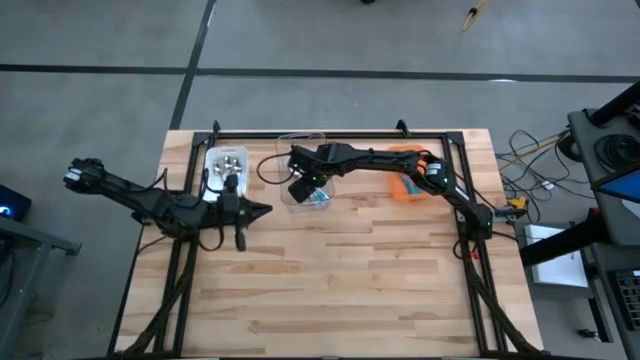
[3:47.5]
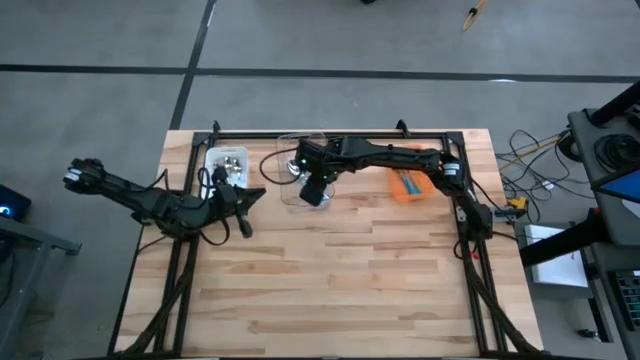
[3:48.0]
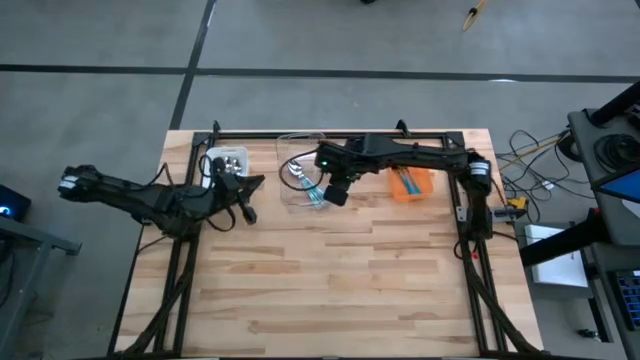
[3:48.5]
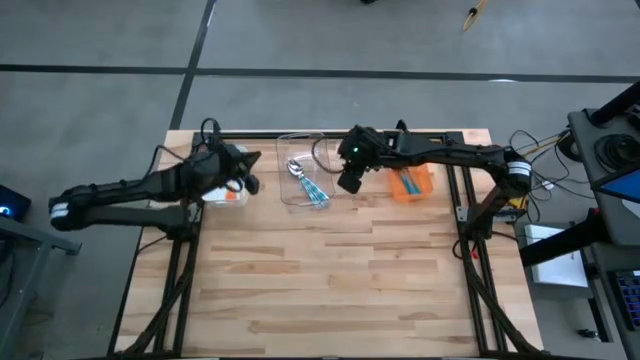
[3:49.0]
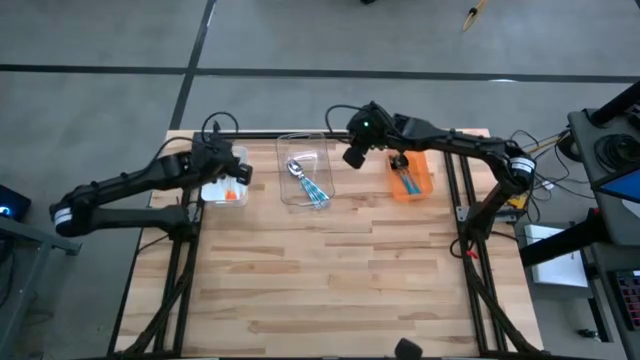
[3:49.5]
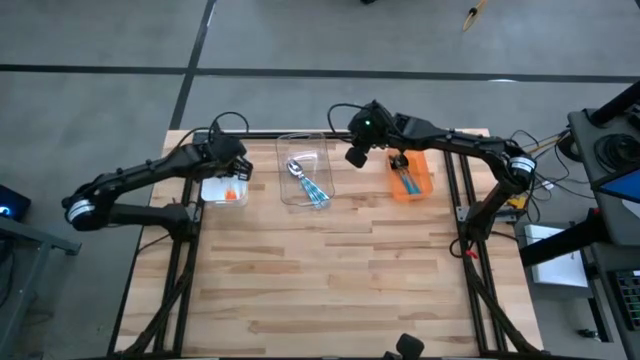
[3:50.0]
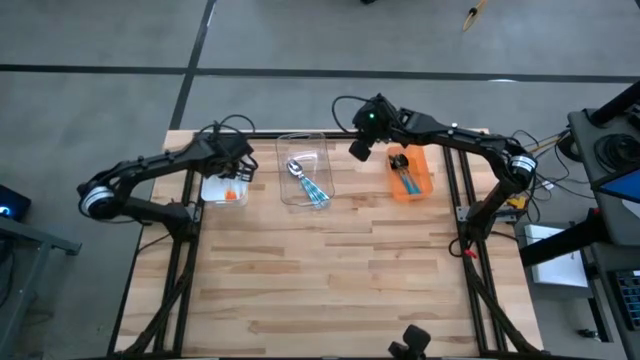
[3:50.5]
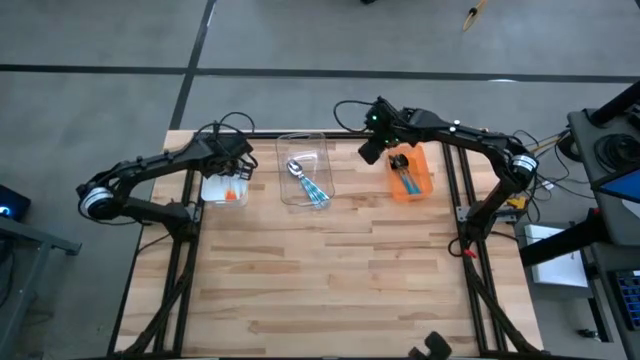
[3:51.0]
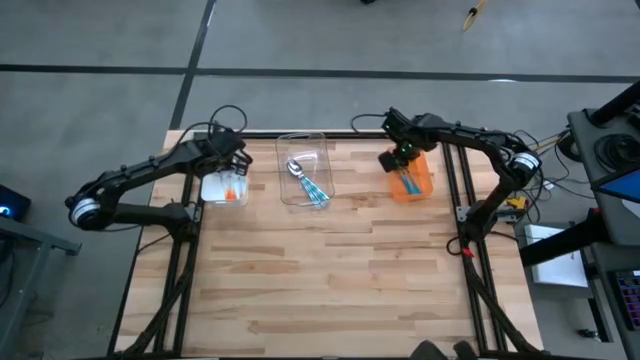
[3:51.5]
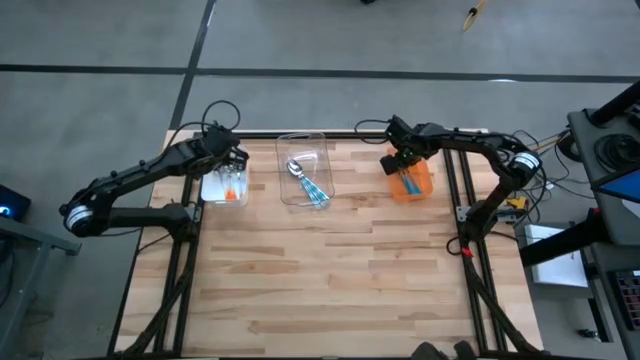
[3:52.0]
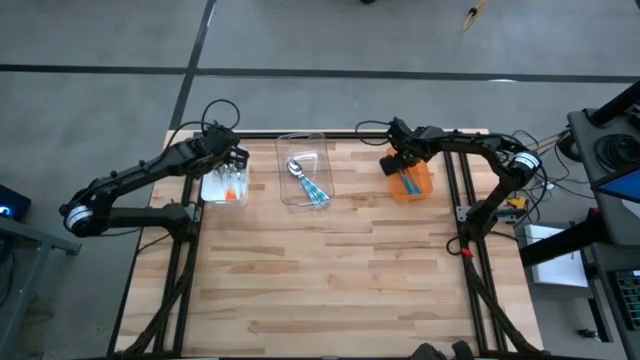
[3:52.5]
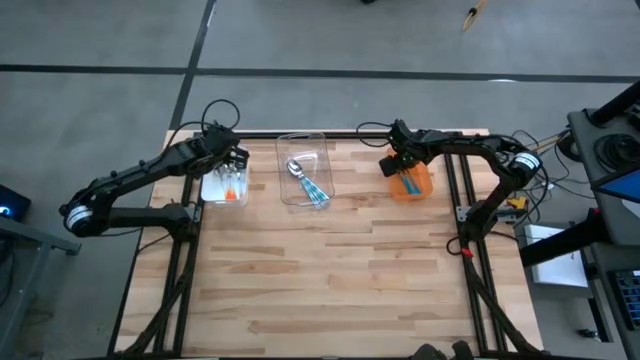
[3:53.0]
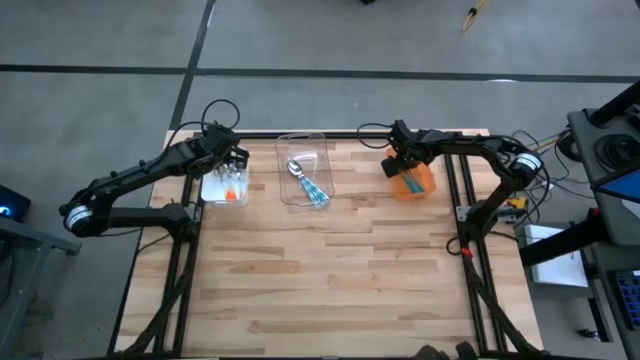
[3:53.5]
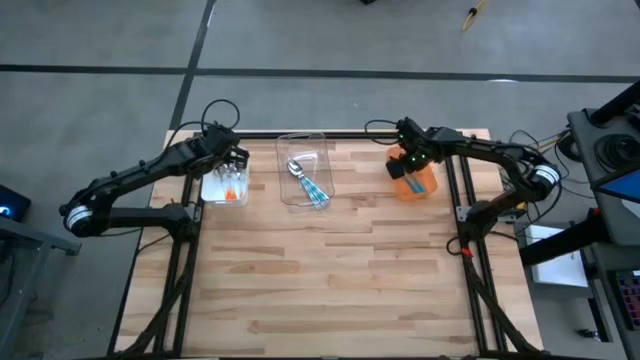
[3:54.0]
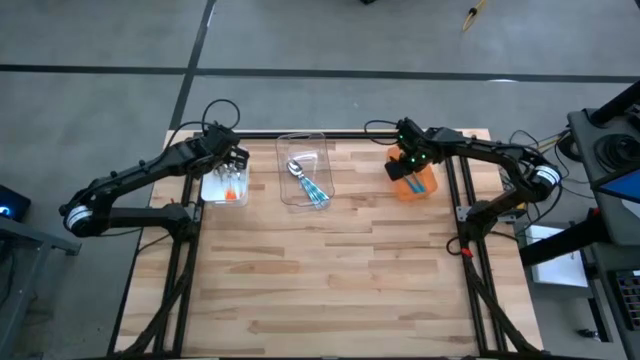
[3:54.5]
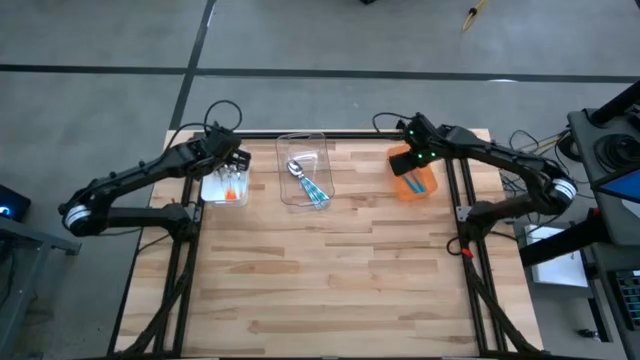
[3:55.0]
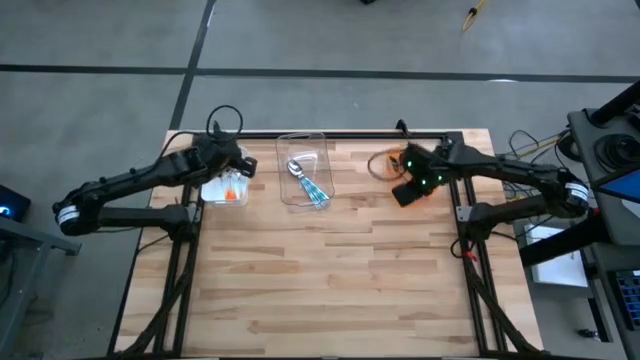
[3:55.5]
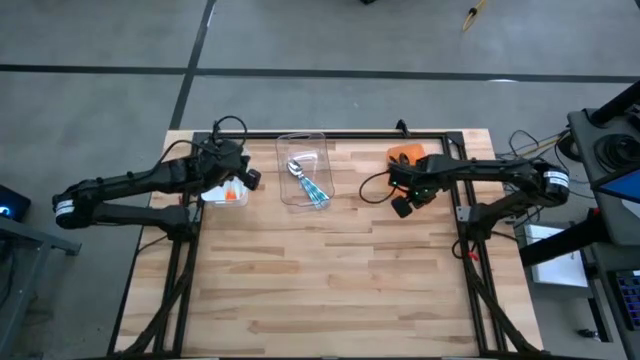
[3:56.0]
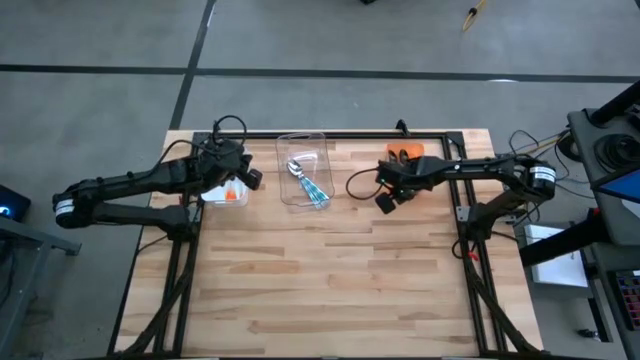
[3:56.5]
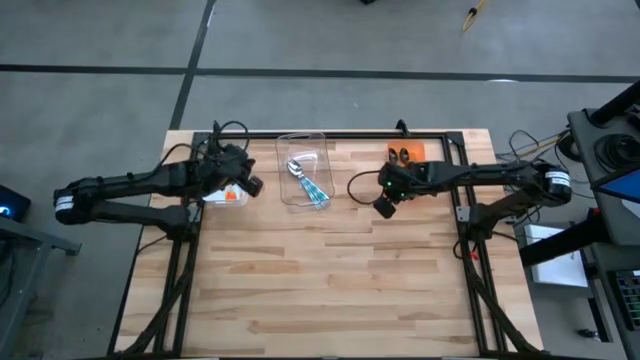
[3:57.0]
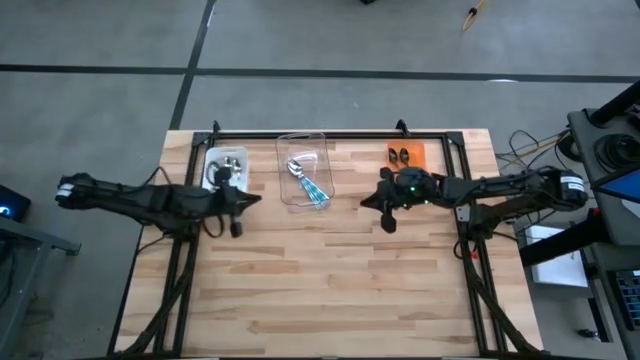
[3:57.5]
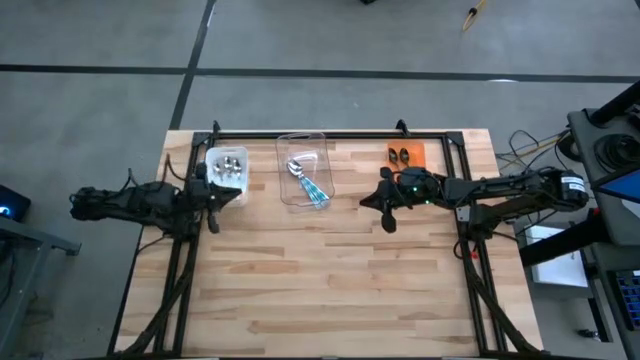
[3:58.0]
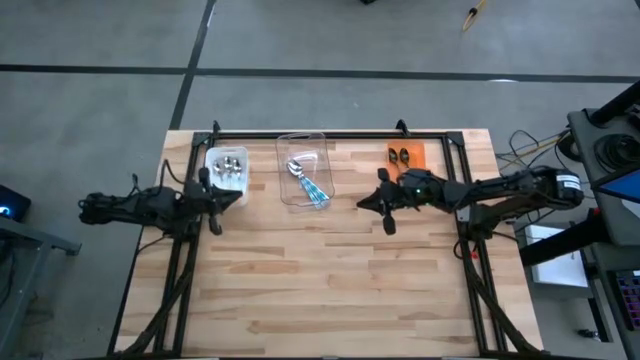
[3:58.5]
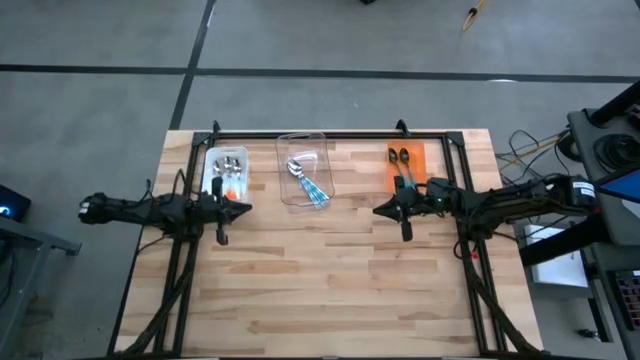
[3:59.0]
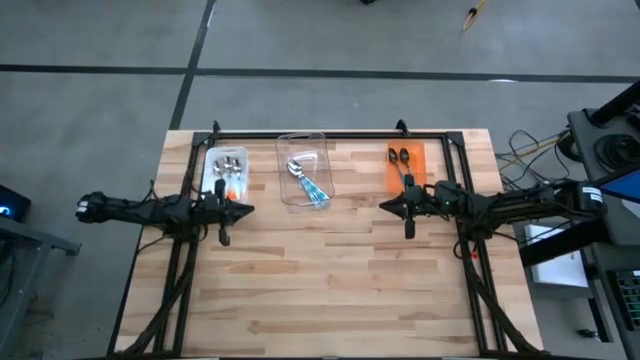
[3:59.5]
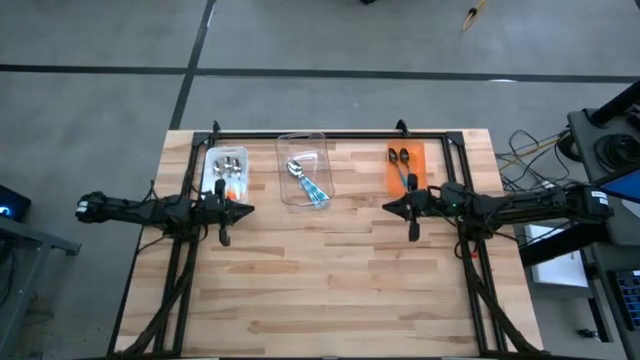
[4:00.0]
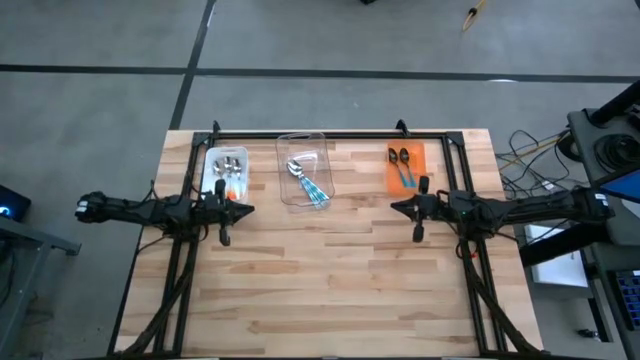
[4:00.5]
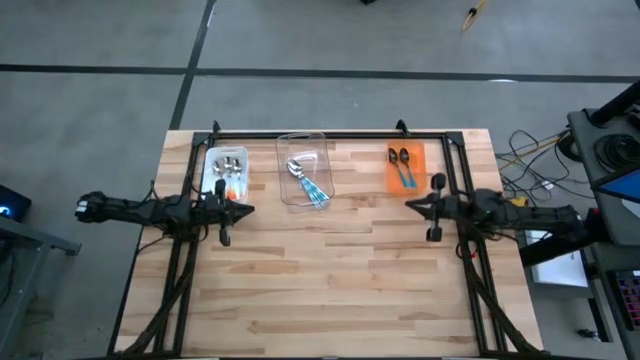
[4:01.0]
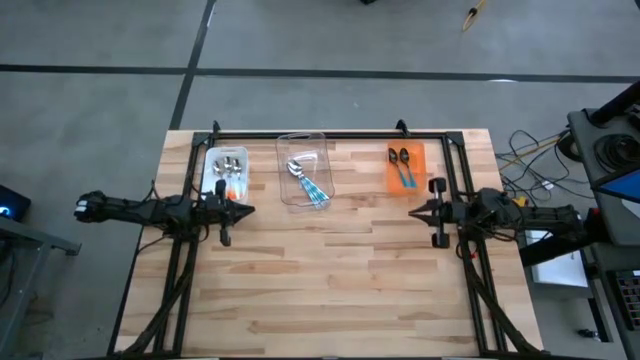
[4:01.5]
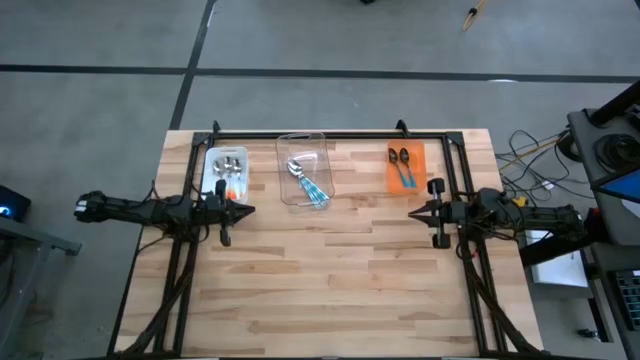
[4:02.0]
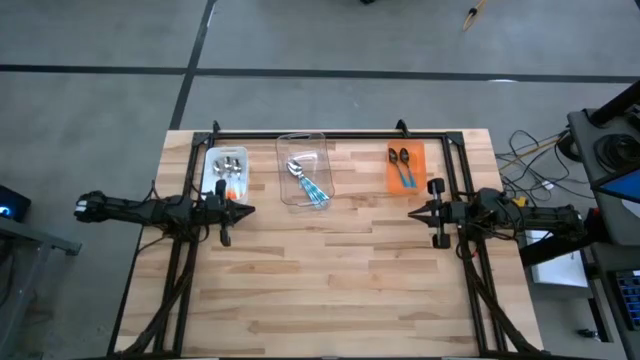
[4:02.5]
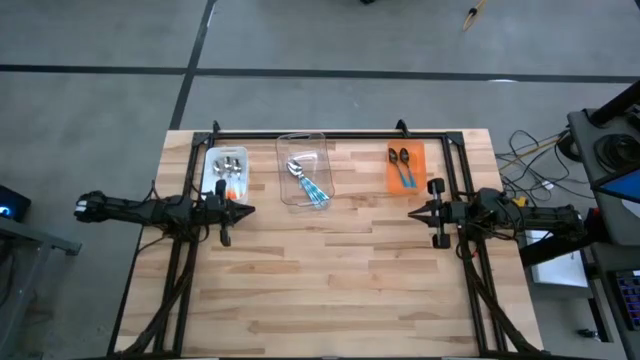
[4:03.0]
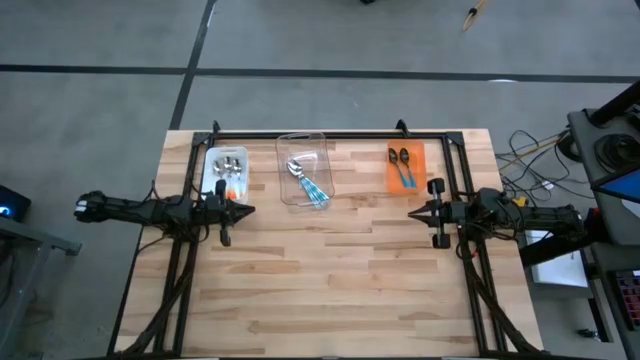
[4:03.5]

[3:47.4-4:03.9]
Task: Sort silverware by color (type)
Return to Home Position

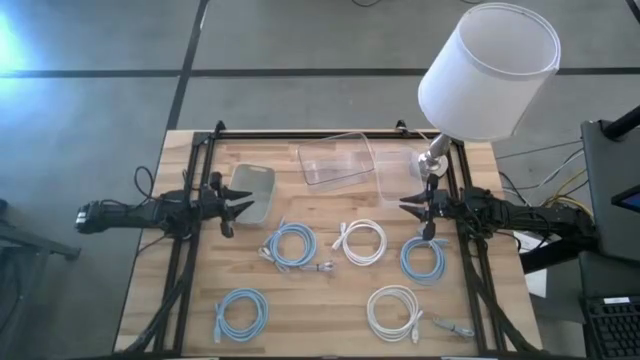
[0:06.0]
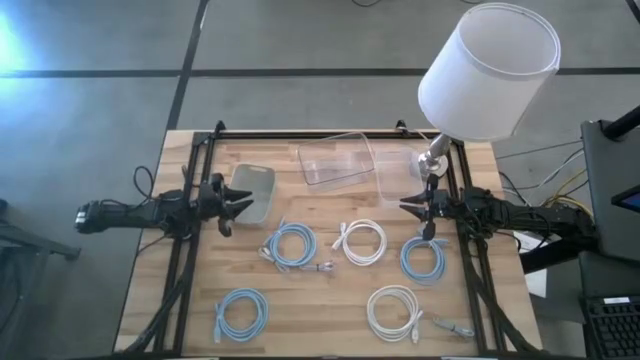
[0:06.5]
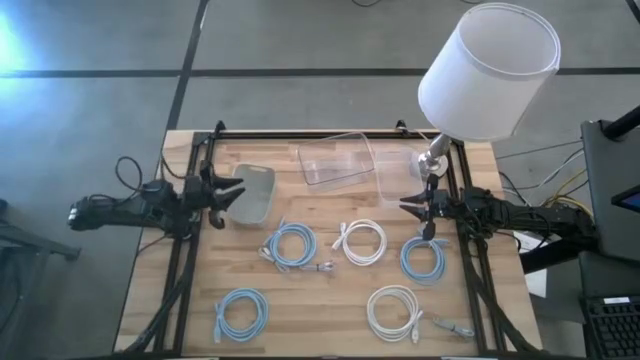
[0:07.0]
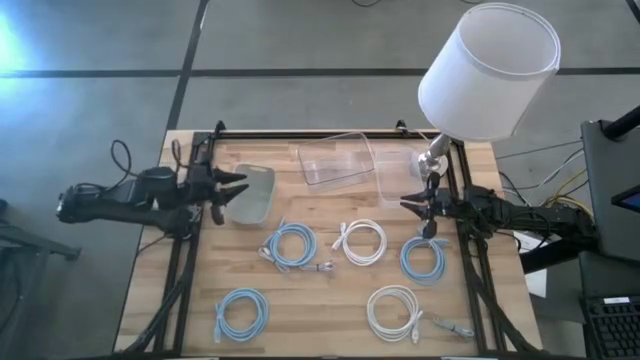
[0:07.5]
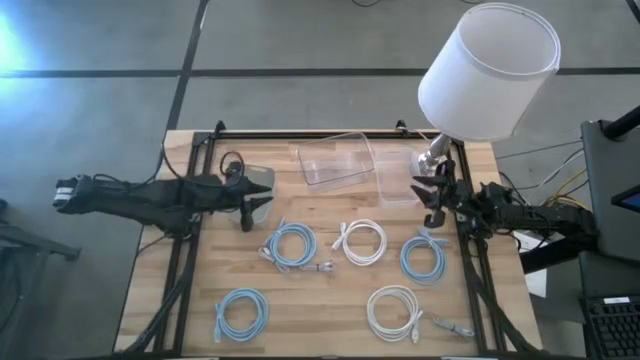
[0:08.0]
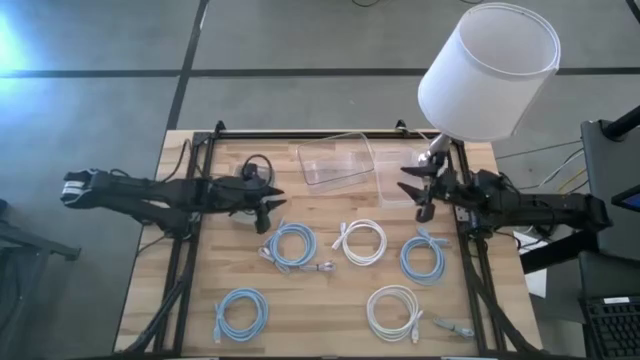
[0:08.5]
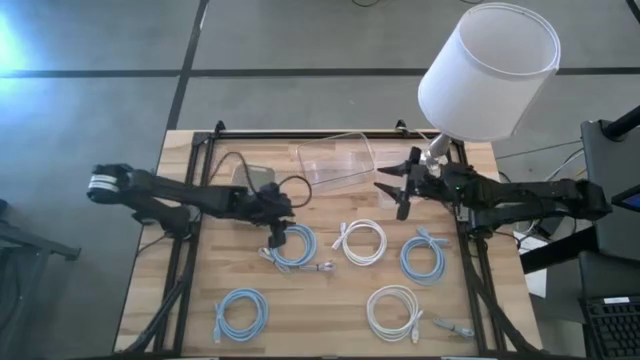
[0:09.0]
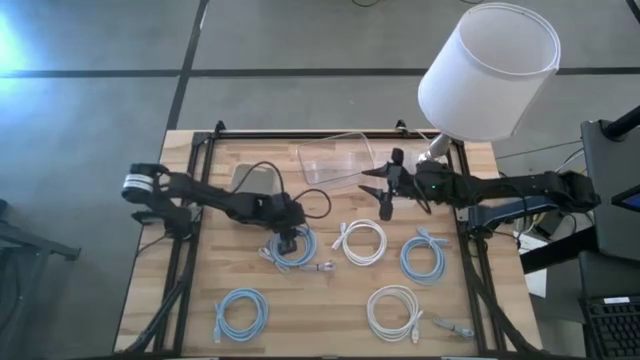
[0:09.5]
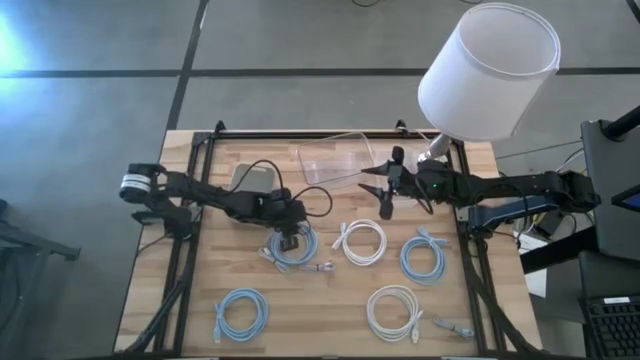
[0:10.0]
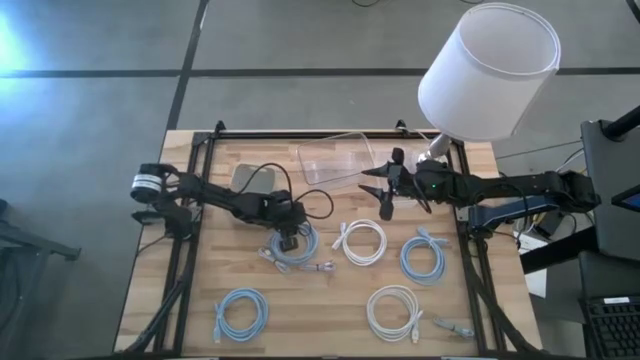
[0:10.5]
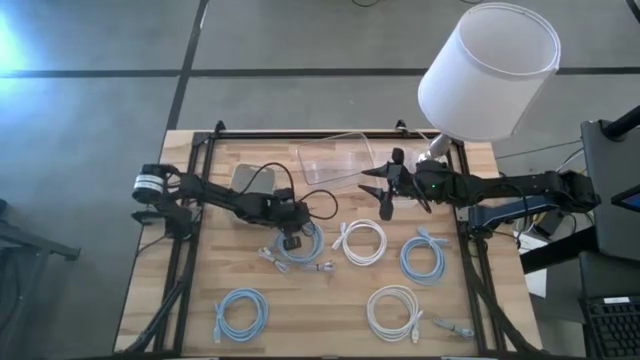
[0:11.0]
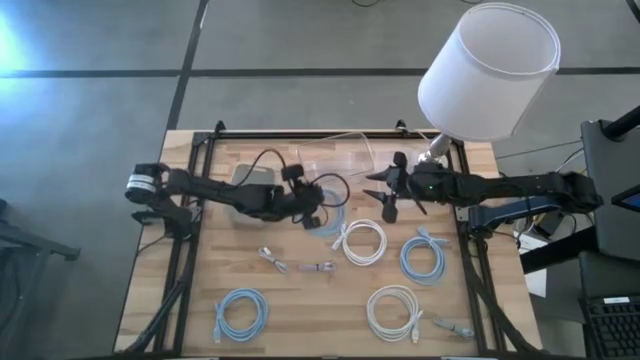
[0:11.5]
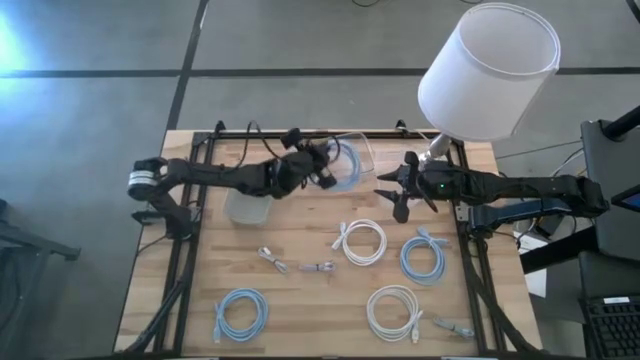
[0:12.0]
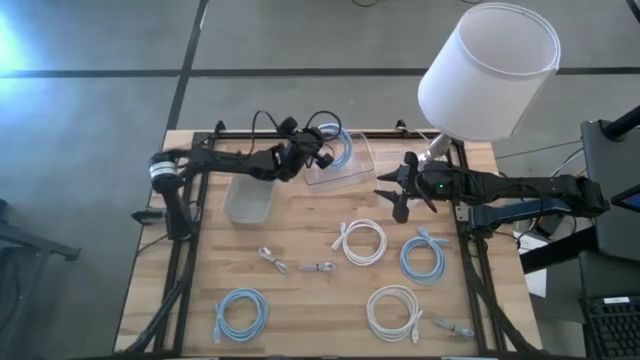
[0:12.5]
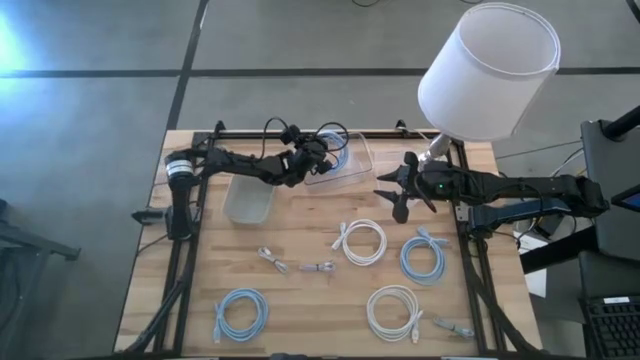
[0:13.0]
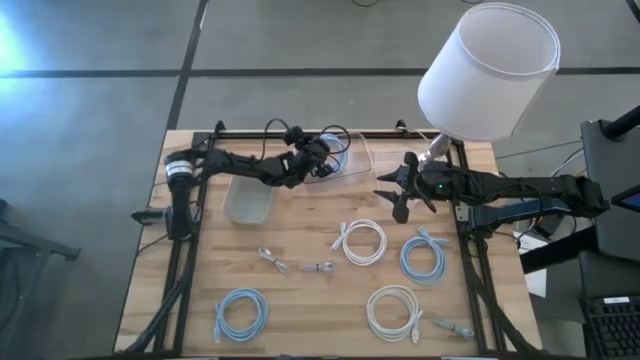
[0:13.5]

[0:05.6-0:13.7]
Task: Pick & Place USB Port
Put the top left blue HDMI cable into the left transparent bin
